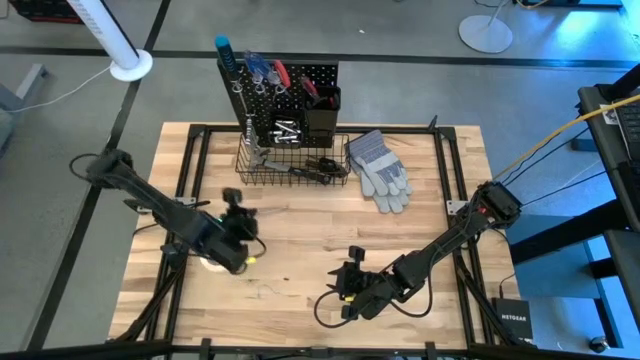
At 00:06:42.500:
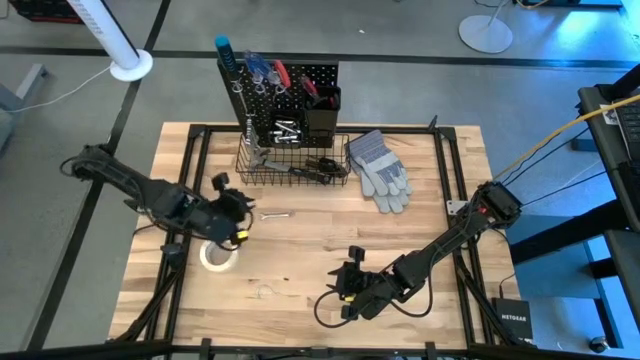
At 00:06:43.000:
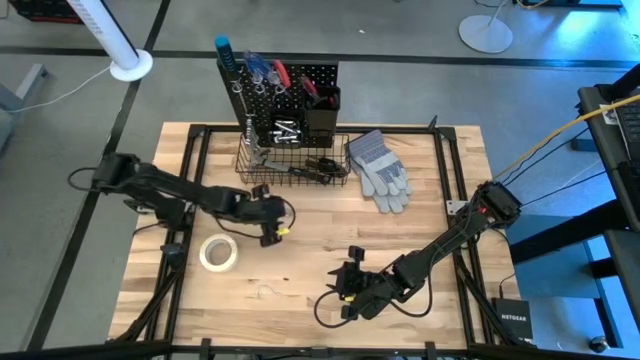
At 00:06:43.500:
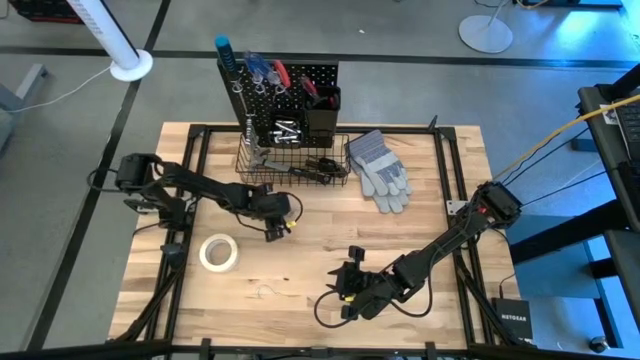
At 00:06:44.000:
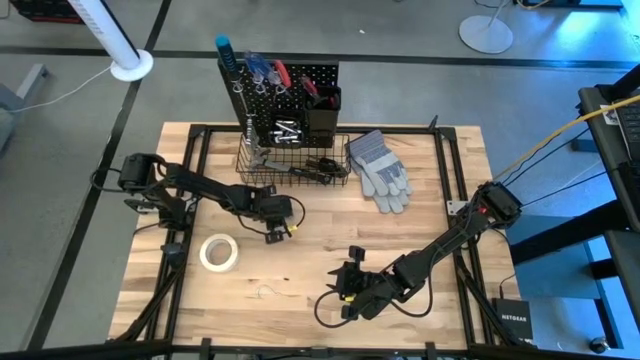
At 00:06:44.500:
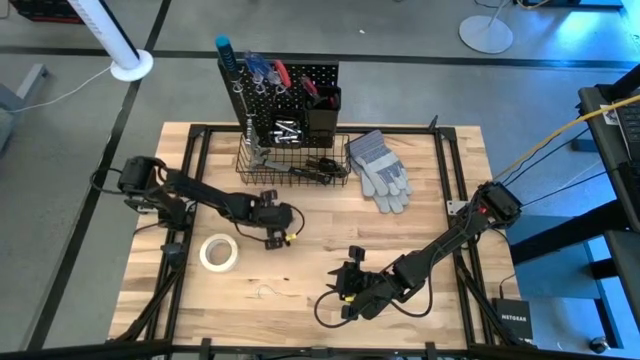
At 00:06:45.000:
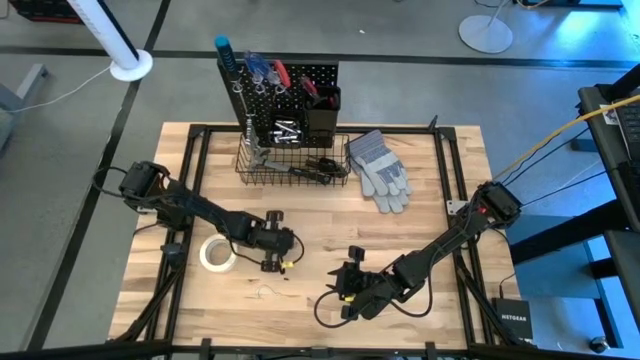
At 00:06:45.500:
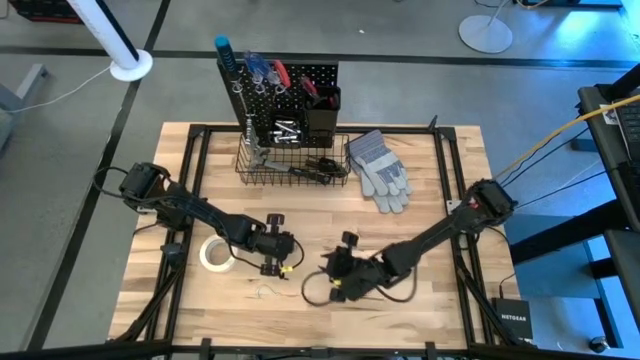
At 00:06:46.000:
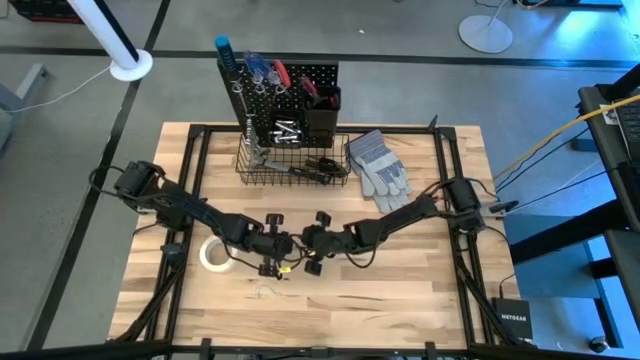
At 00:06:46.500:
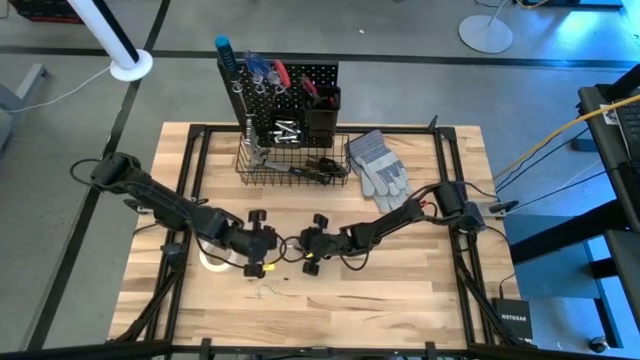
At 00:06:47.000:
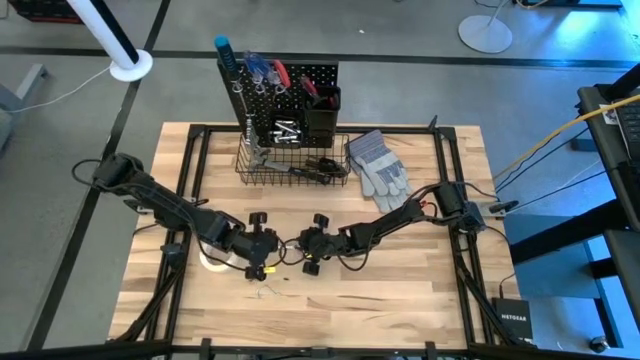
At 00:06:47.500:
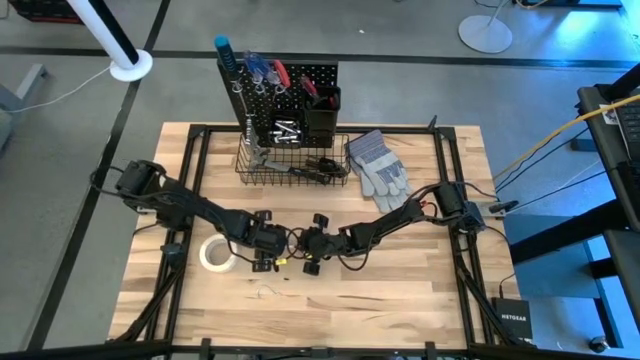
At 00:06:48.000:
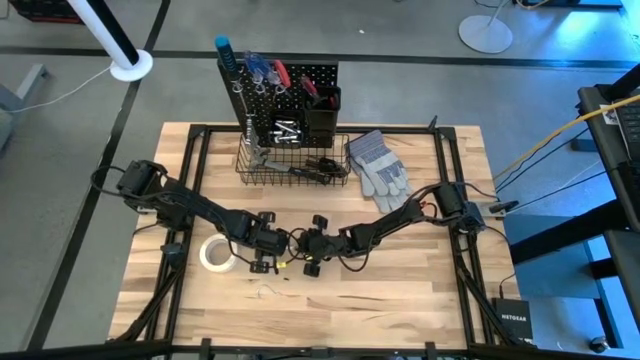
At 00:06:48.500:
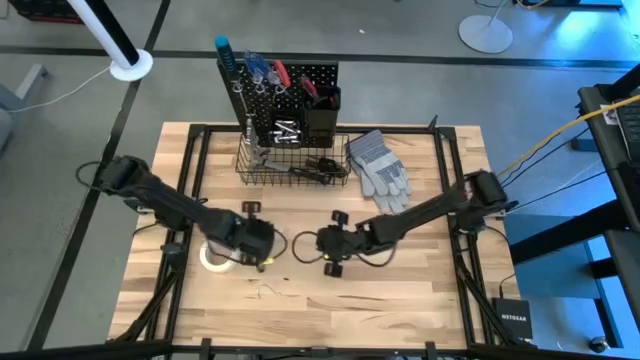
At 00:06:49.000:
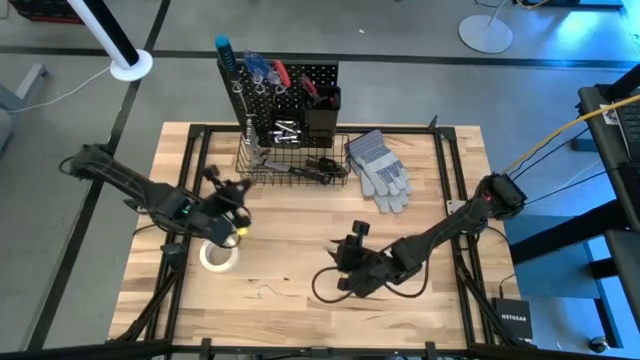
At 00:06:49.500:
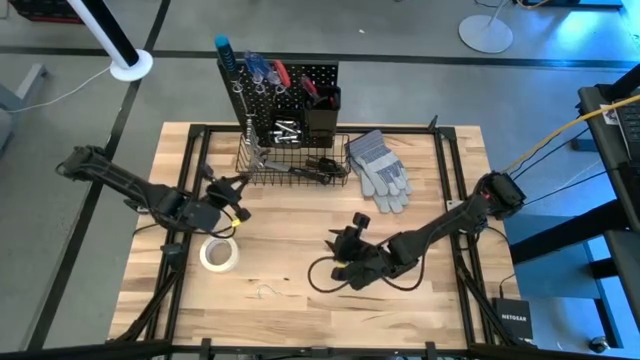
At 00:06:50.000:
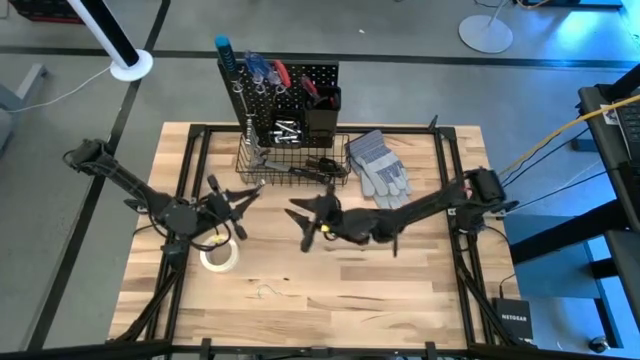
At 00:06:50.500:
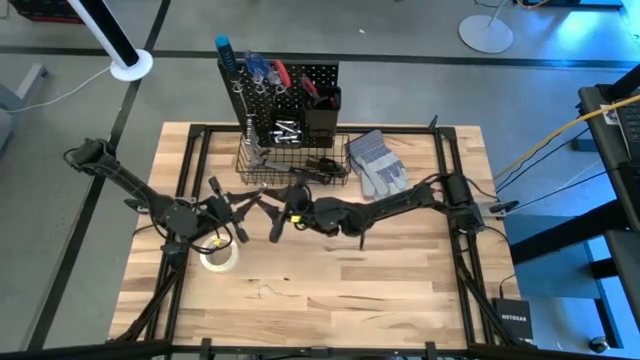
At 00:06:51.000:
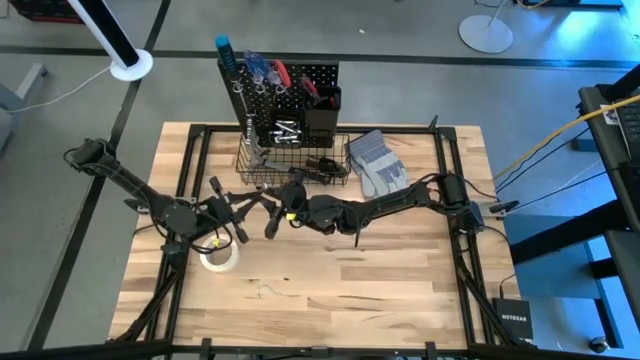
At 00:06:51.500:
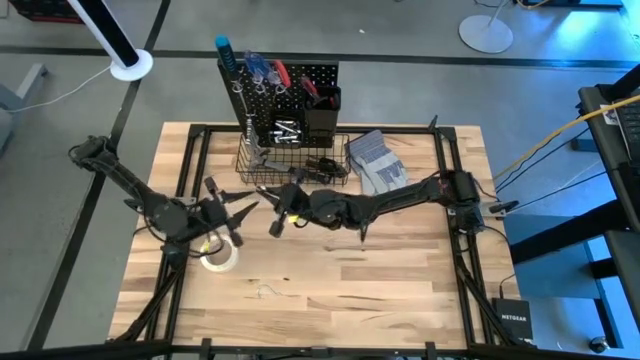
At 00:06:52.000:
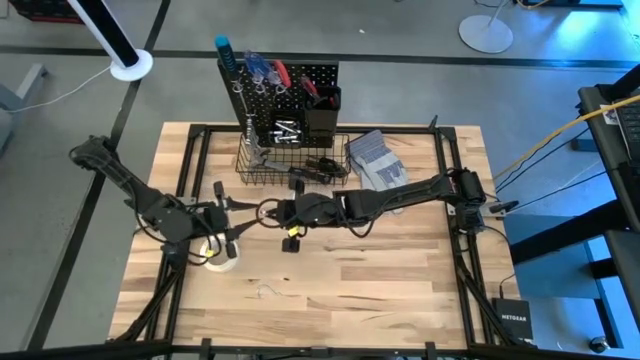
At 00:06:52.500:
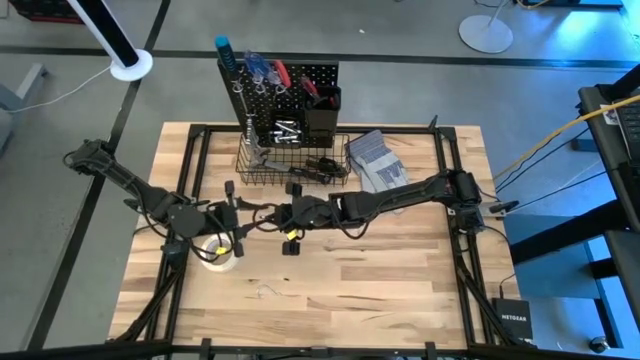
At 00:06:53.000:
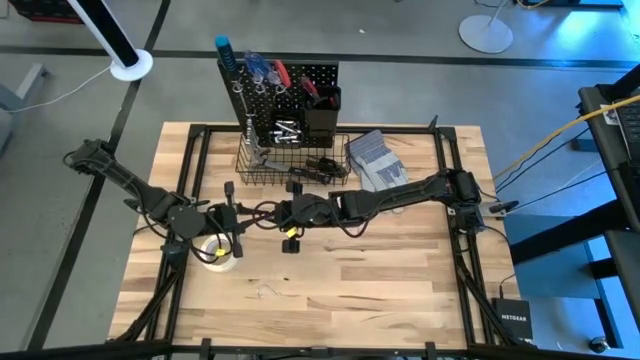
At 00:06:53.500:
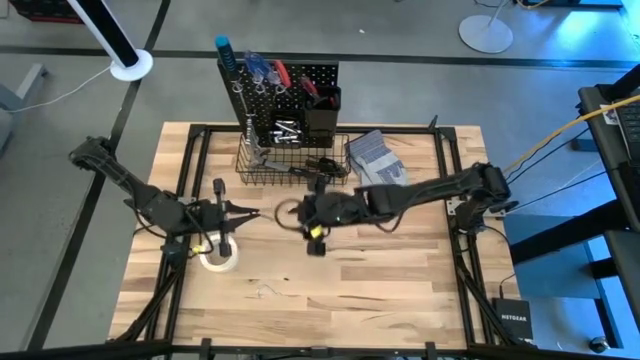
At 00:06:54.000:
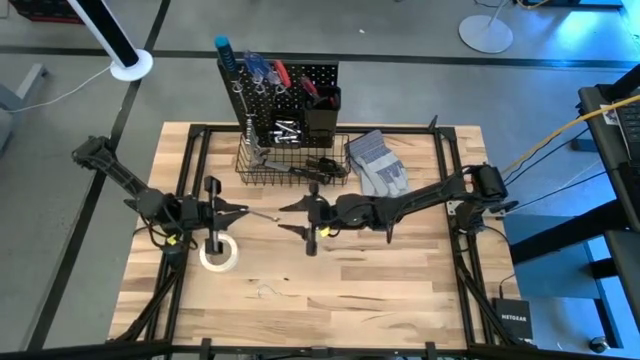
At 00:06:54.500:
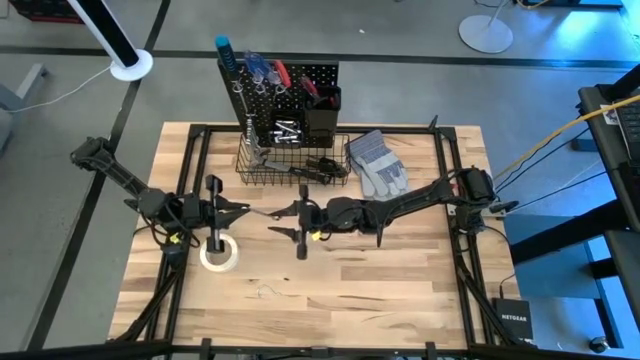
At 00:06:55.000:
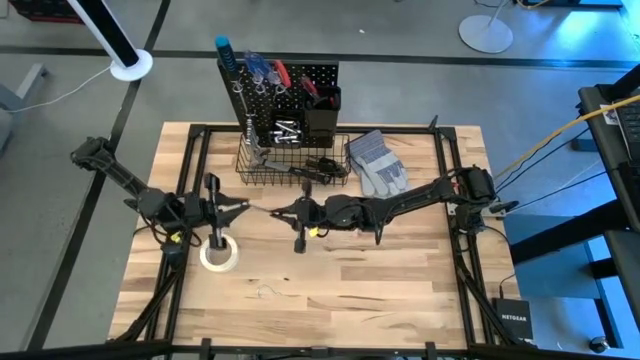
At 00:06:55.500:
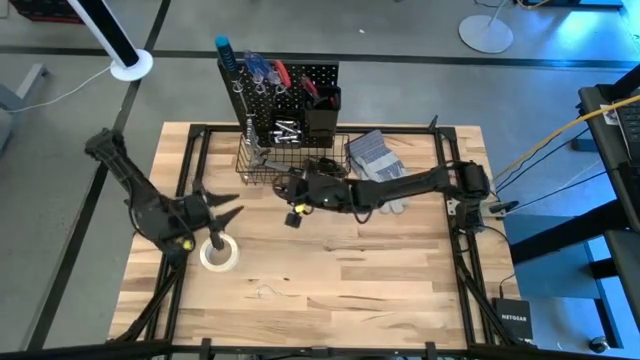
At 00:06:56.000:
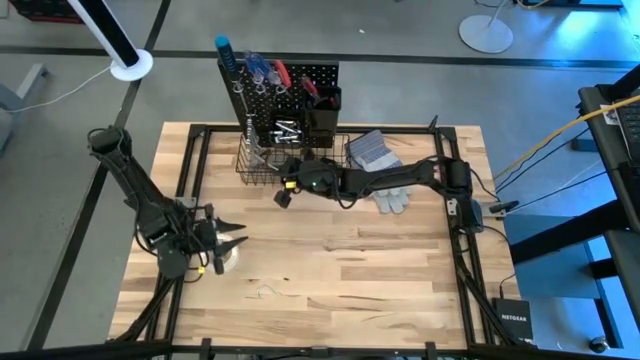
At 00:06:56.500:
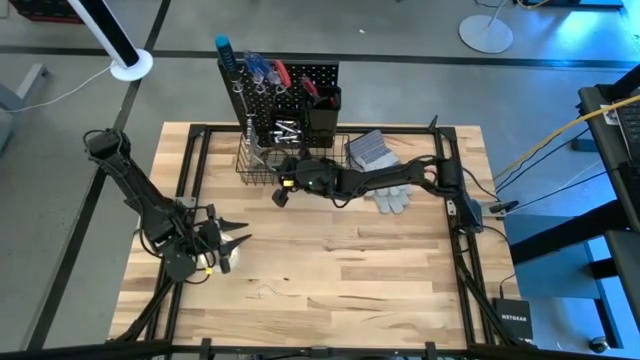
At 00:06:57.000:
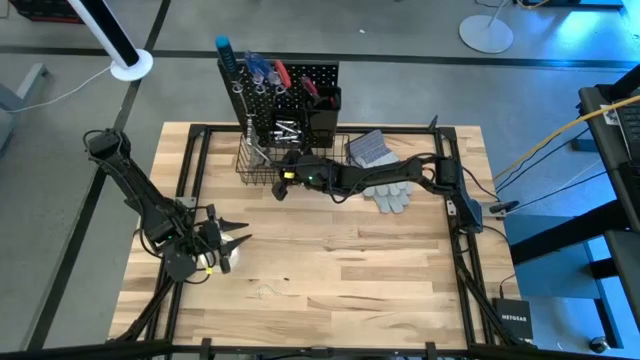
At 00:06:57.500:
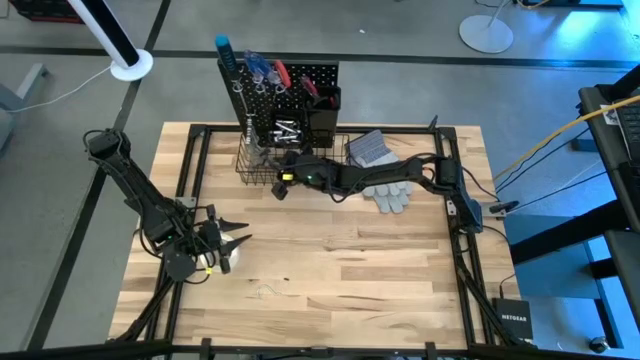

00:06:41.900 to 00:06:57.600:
Task: Hang tools onto peg board
Hang the wrench on the peg board

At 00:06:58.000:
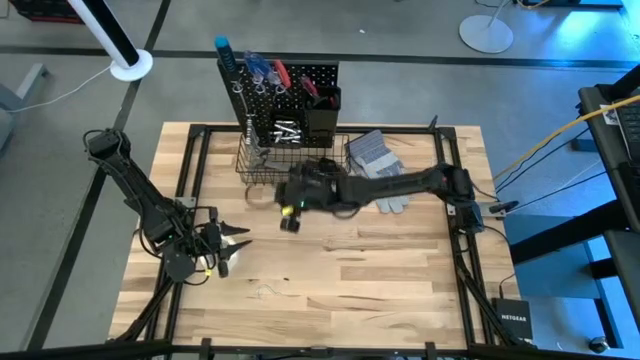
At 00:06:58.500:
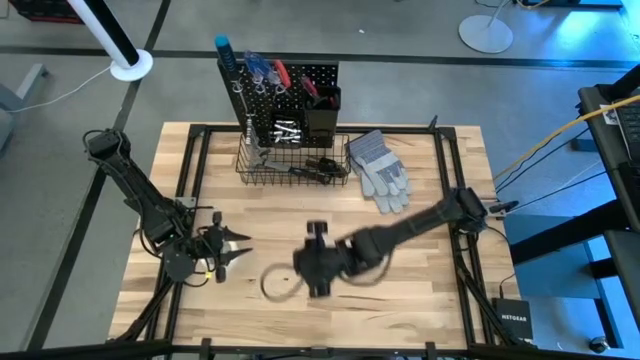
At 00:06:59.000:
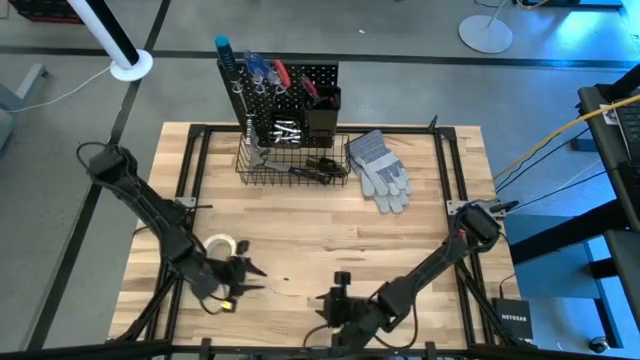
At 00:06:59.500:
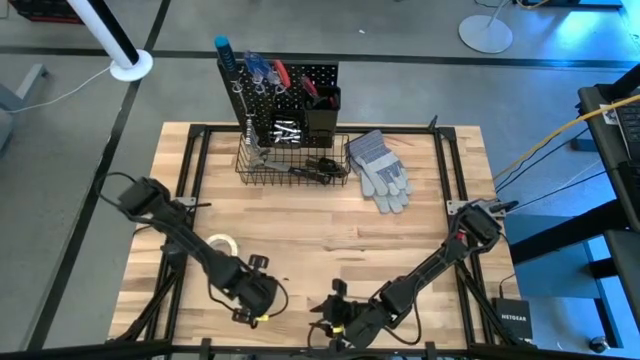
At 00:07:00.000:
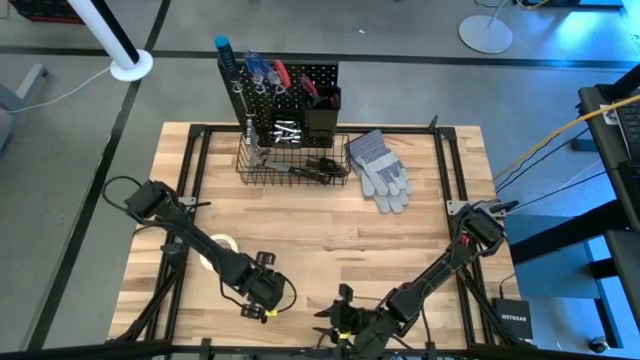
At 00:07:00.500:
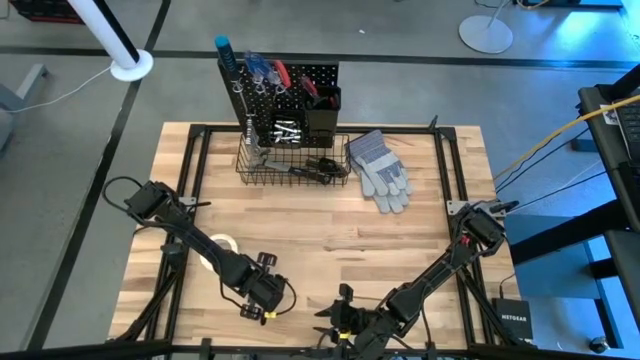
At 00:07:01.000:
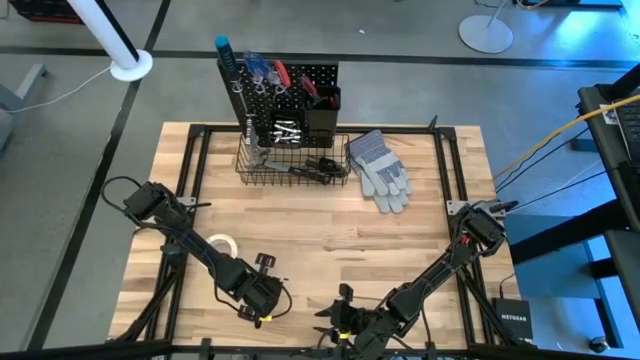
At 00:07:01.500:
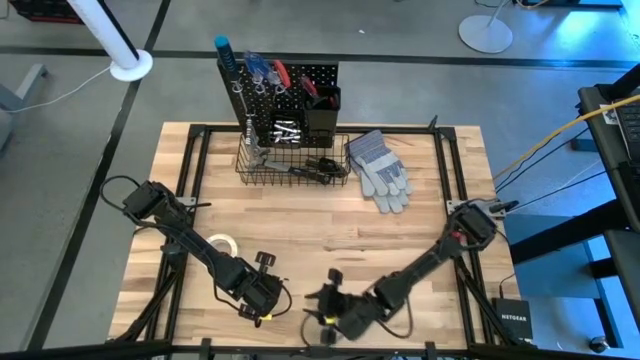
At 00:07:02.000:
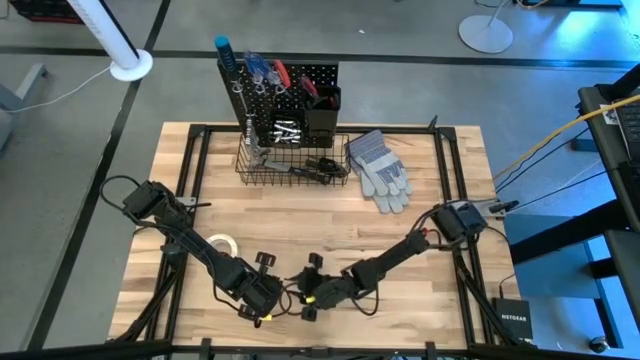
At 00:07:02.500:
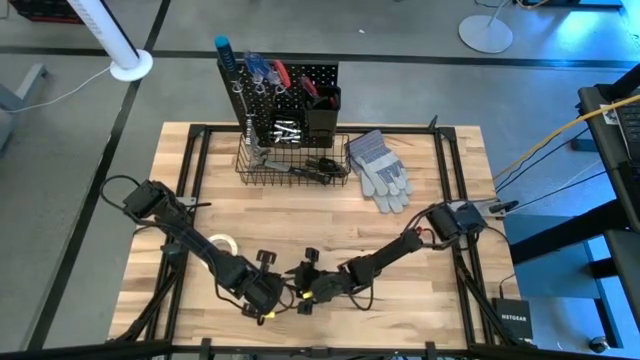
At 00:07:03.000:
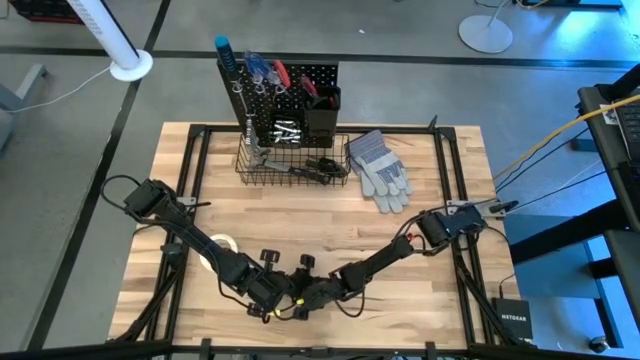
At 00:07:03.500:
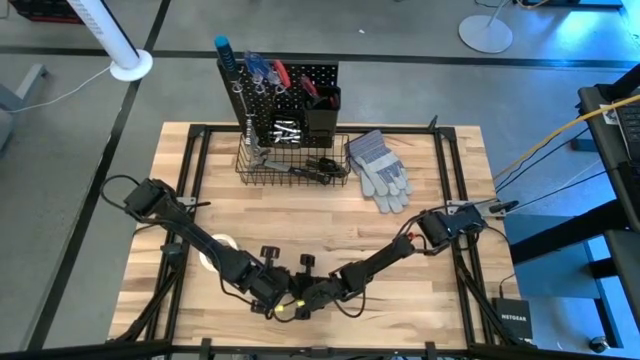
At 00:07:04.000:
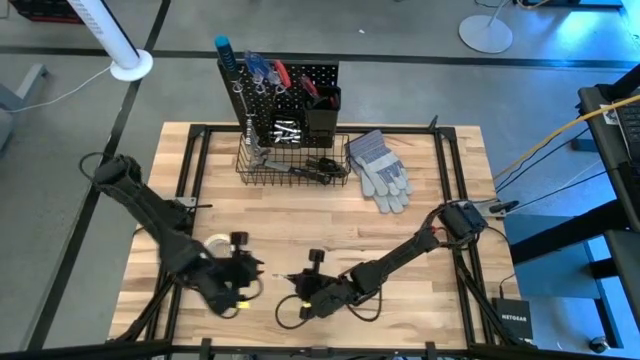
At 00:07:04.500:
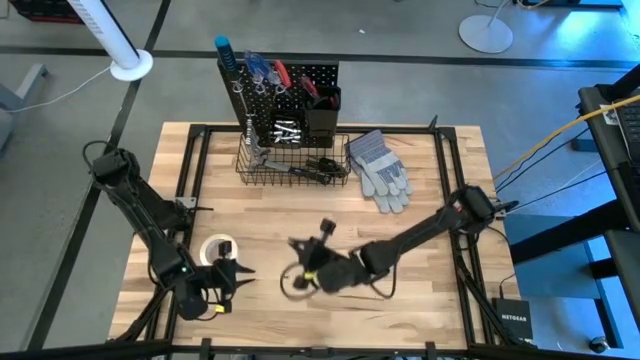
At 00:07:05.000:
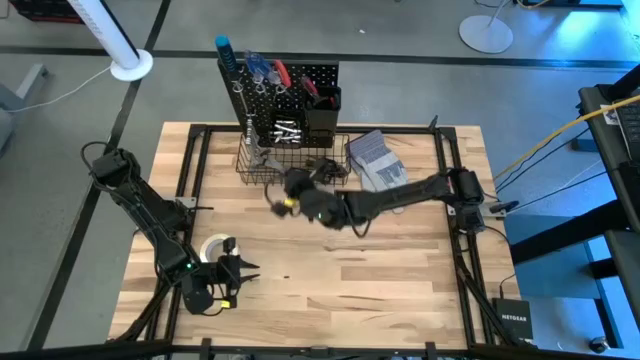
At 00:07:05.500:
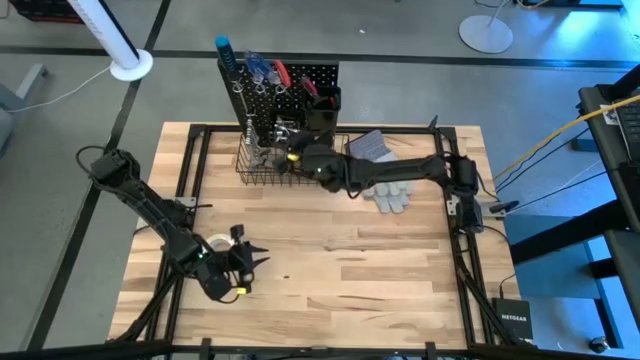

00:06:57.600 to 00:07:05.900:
Put the hanger hook into the left black bin on the peg board
